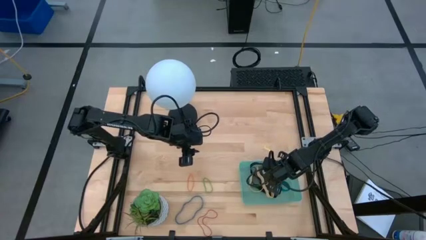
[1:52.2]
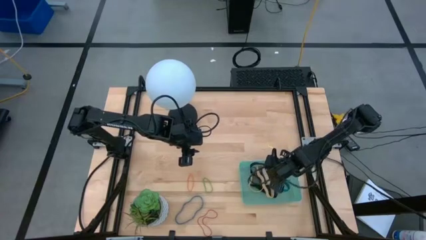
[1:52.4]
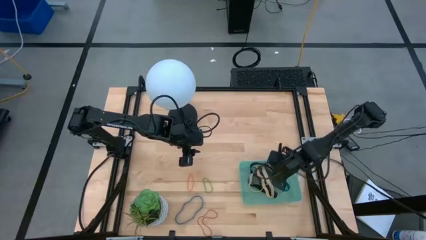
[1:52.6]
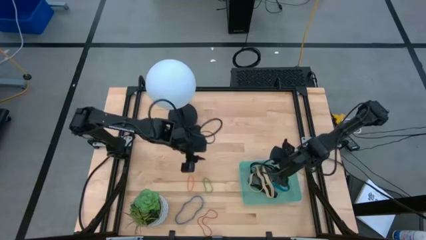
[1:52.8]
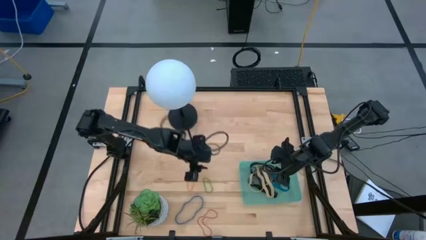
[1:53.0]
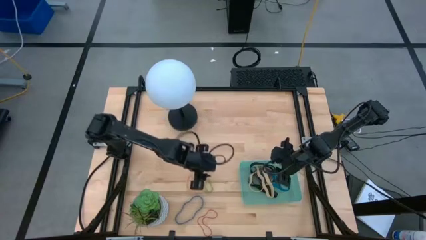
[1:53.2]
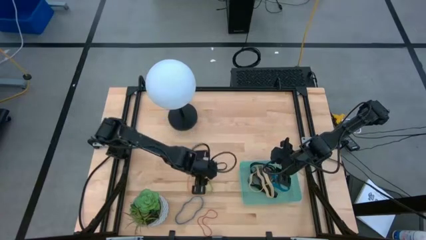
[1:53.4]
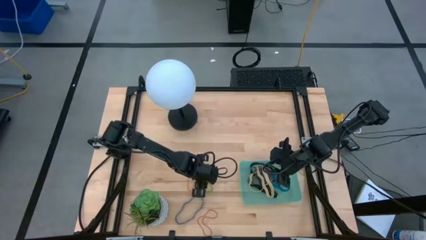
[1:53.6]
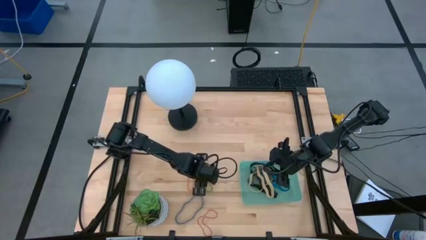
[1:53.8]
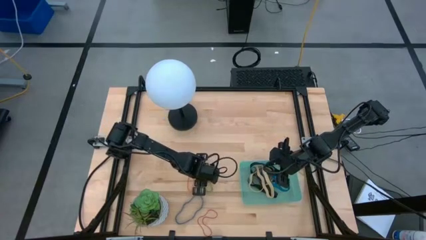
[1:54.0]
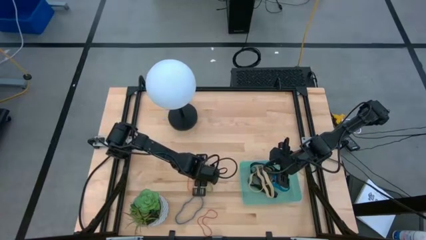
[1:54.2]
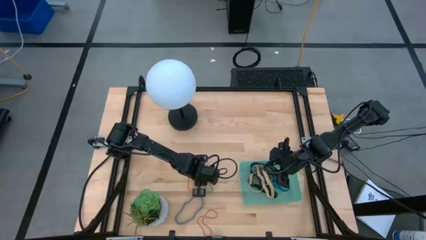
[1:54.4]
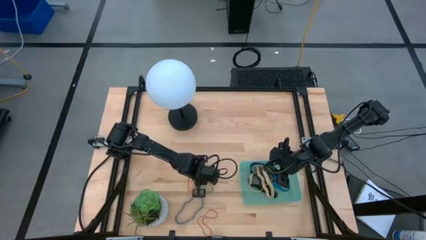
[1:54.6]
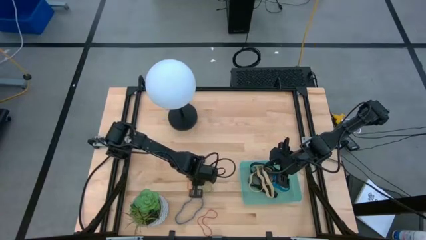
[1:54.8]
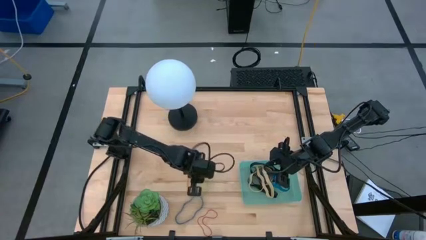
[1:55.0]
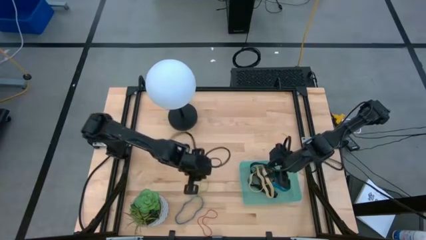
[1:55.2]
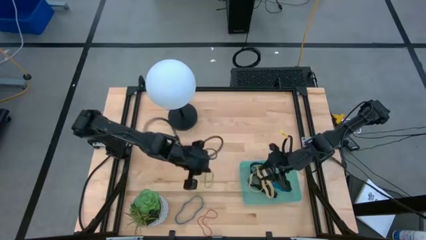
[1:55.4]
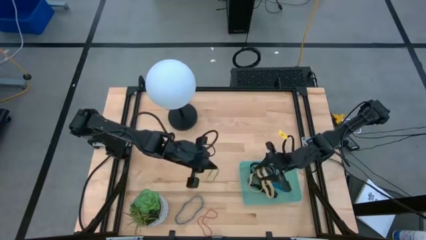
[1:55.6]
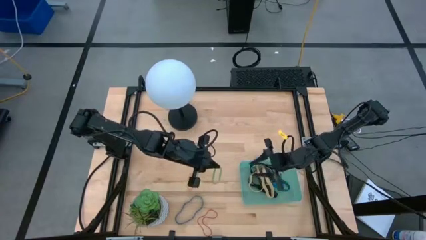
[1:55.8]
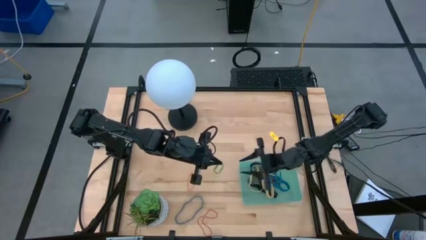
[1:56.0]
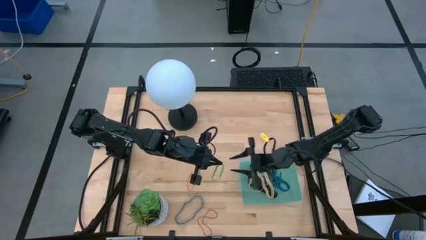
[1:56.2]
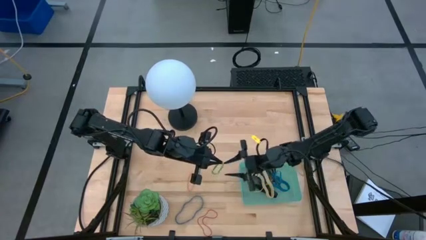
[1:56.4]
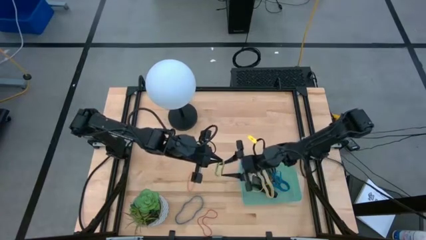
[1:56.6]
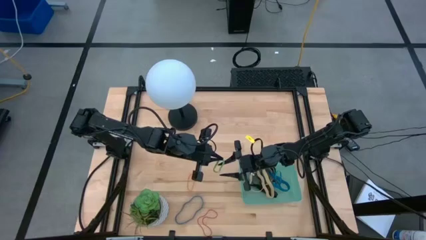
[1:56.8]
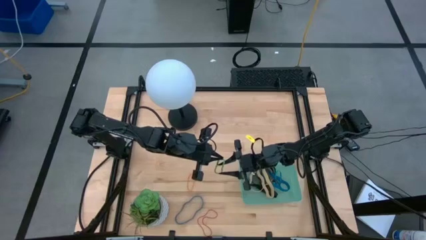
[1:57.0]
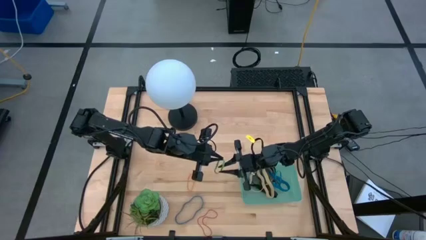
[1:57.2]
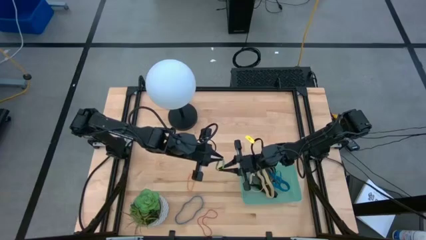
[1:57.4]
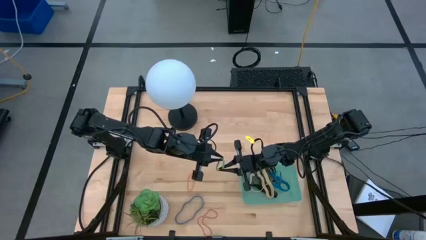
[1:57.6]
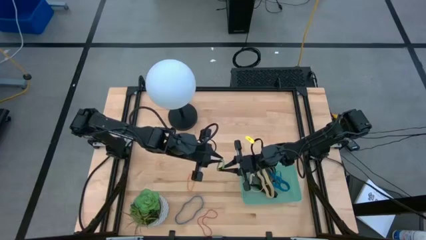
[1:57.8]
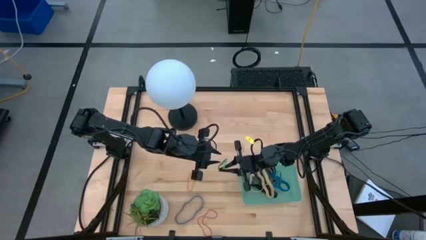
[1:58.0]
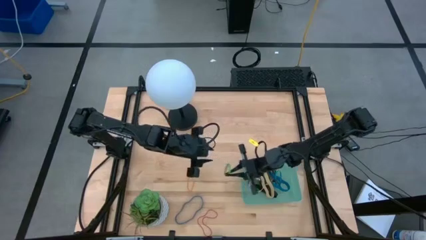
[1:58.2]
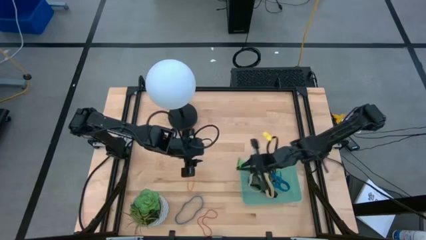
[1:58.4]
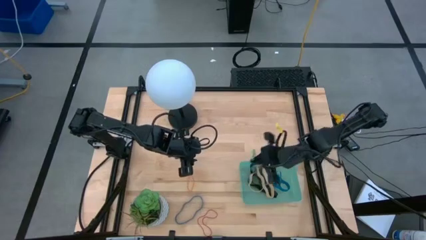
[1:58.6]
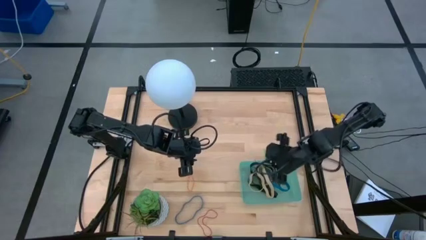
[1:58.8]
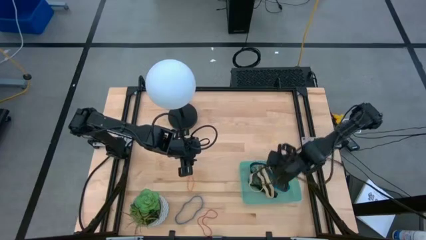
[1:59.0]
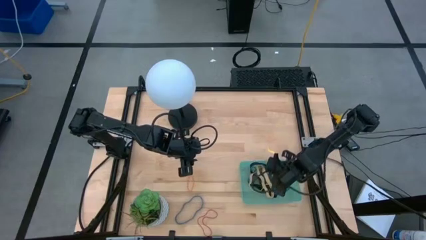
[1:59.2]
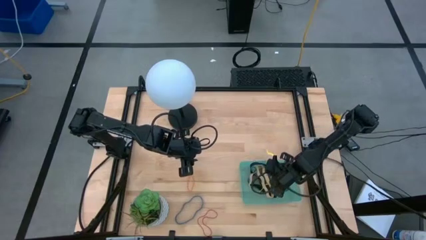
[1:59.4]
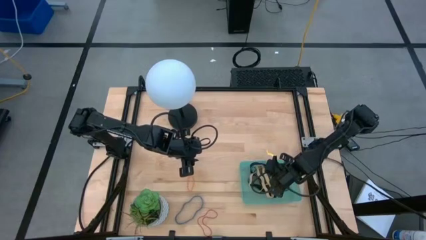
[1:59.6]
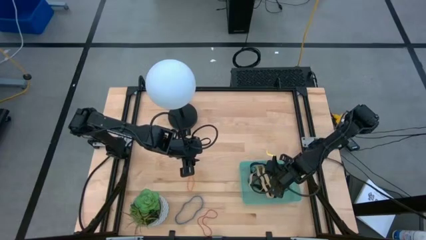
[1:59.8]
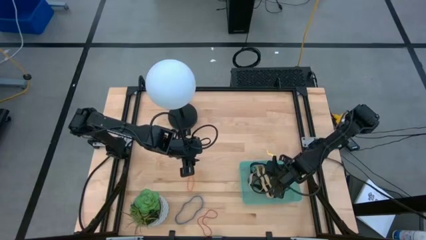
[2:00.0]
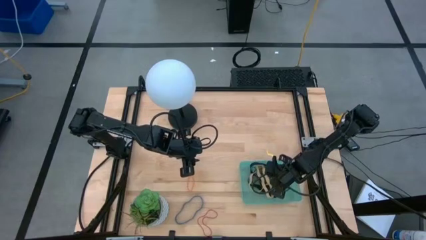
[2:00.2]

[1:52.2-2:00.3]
Task: Pick and place rubber bands into bin
Put the green rubber band into the green bin

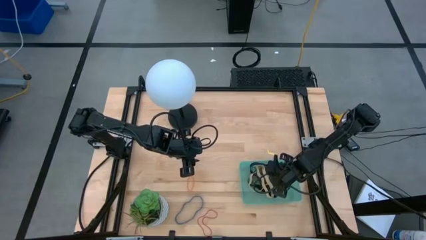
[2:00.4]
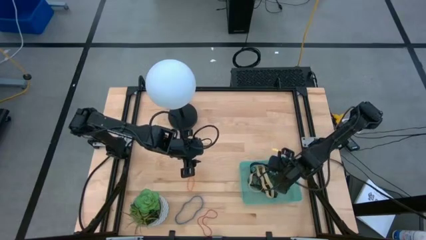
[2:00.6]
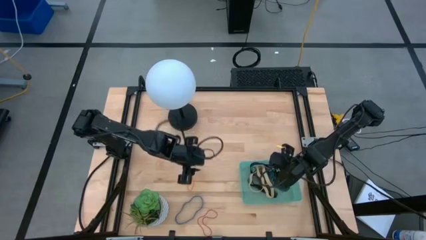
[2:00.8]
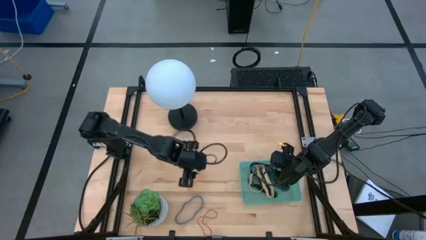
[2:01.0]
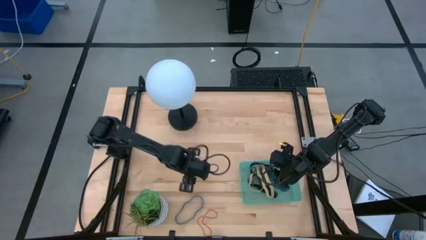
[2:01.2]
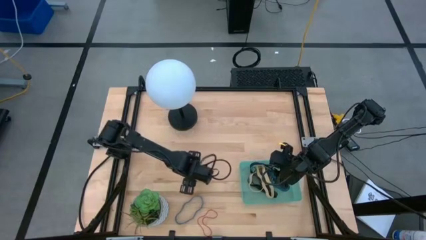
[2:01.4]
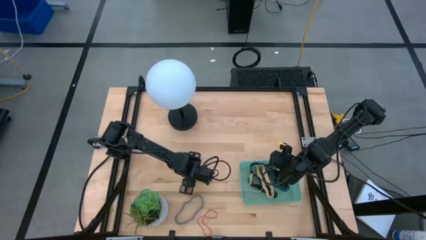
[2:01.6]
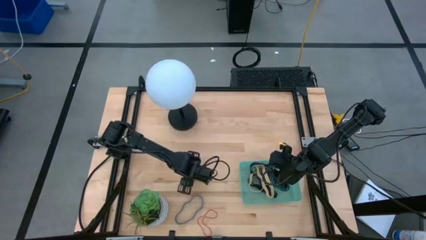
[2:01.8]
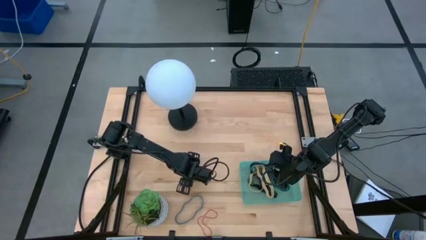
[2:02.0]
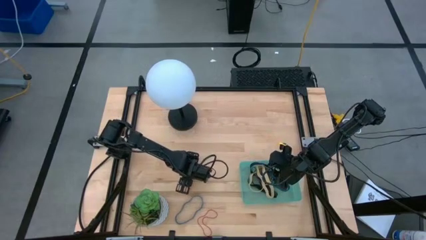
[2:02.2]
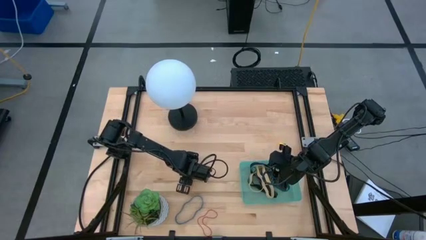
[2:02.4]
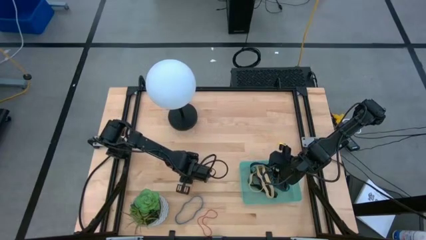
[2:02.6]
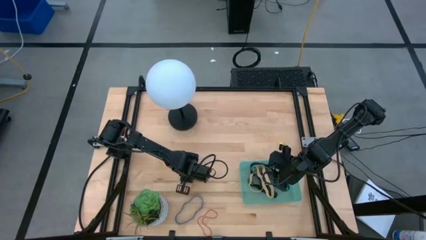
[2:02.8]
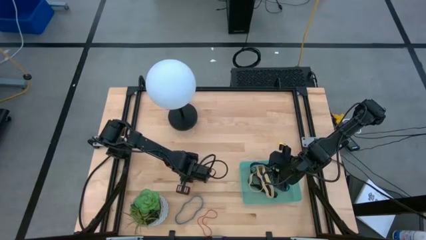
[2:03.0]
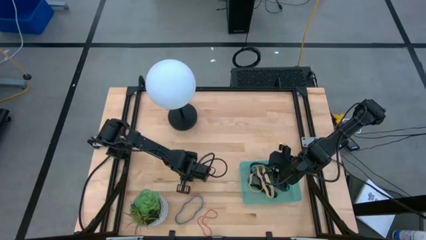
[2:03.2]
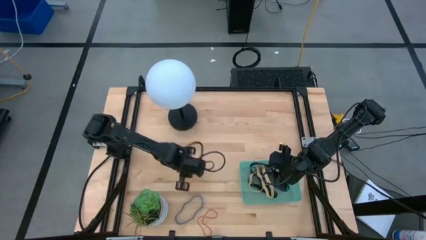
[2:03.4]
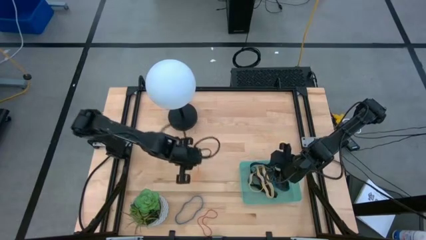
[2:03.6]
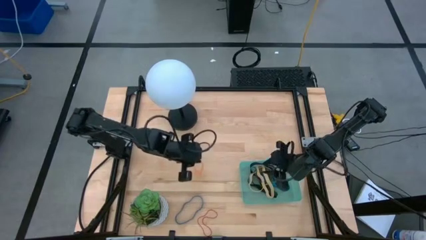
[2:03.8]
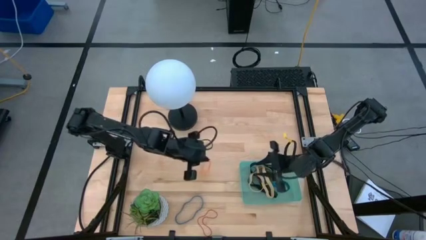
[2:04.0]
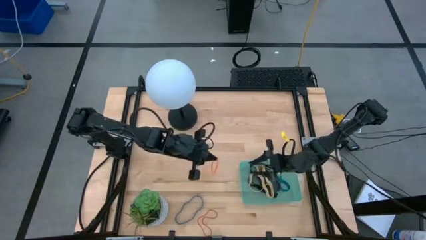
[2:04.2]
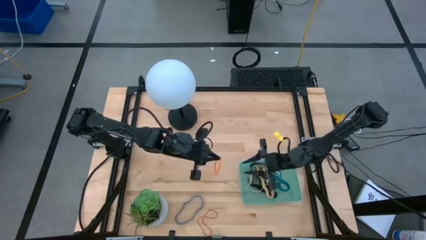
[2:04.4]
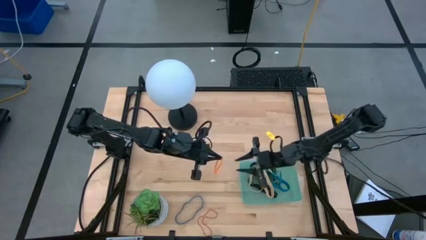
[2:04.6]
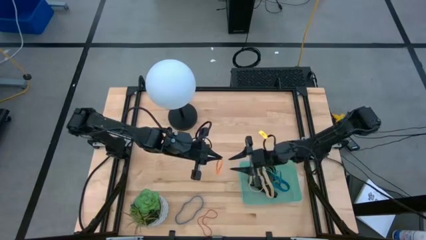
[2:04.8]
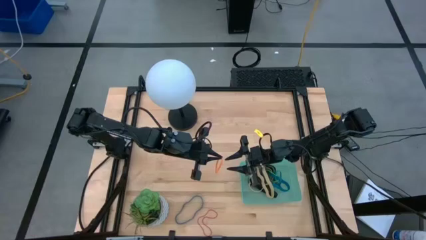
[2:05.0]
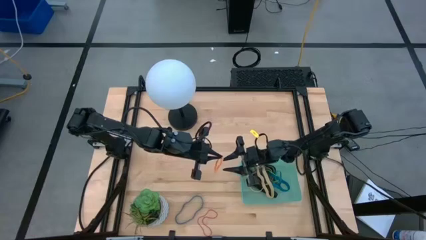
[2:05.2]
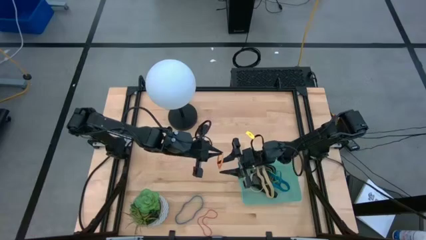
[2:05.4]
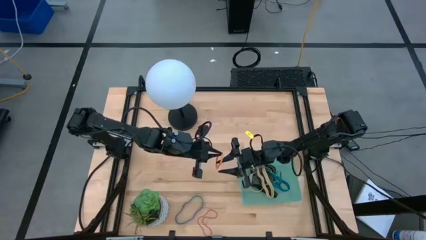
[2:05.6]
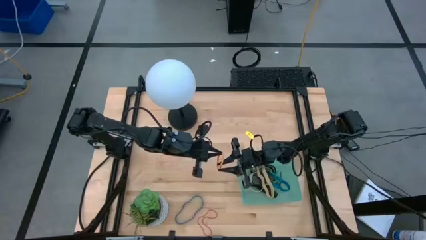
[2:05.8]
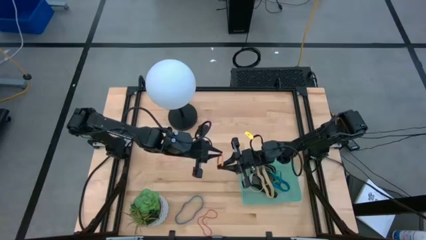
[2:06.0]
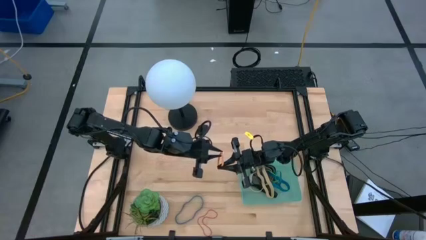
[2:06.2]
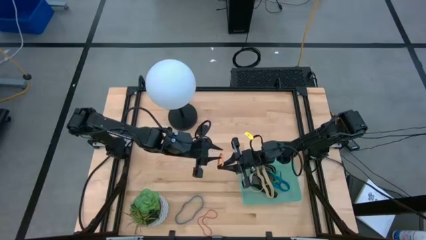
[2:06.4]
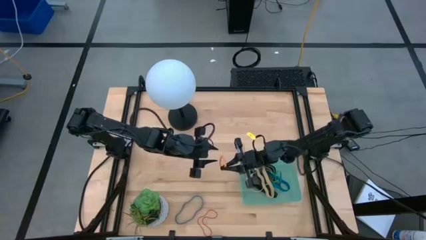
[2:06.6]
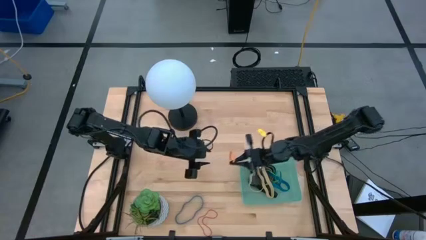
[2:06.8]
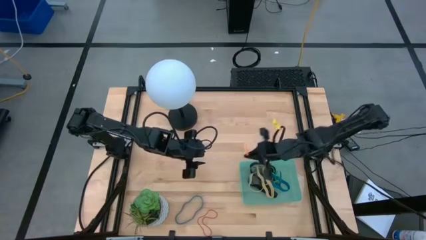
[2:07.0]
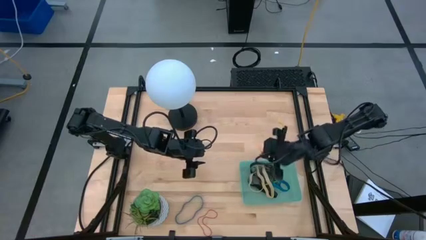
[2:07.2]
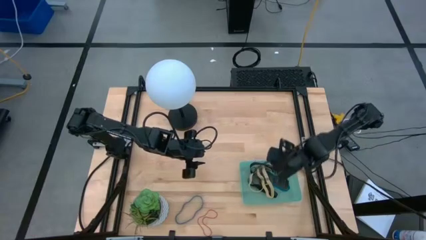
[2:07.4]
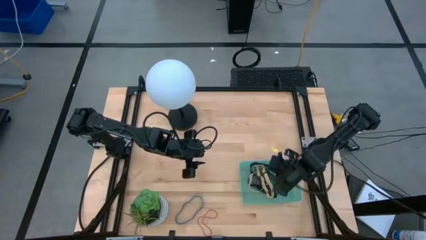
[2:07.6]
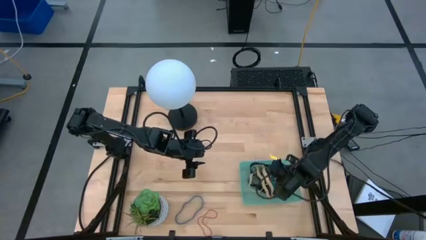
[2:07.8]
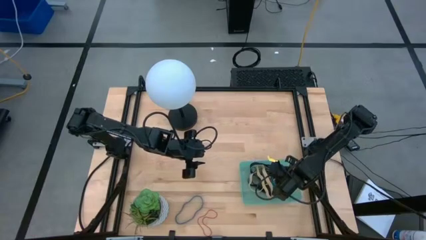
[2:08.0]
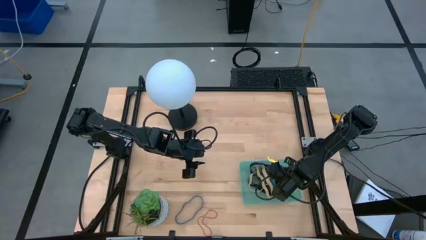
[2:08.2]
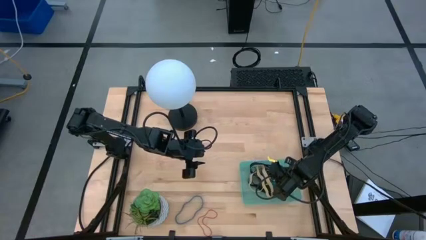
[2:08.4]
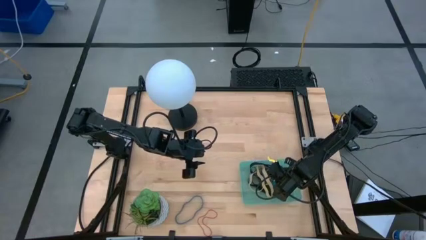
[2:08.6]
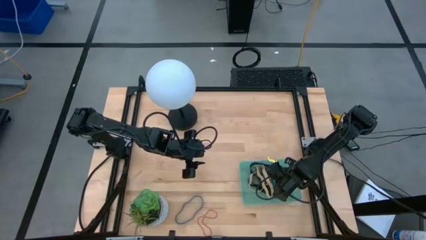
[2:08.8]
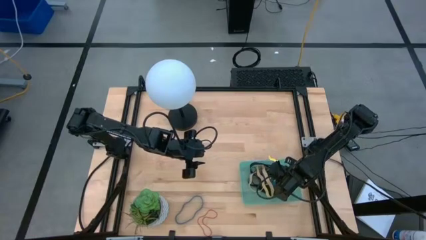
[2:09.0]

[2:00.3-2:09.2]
Put the orange rubber band into the green bin
